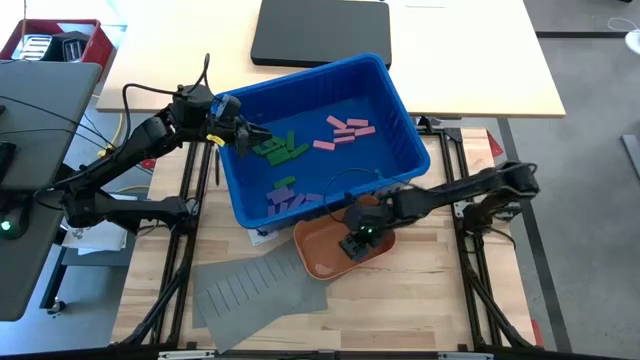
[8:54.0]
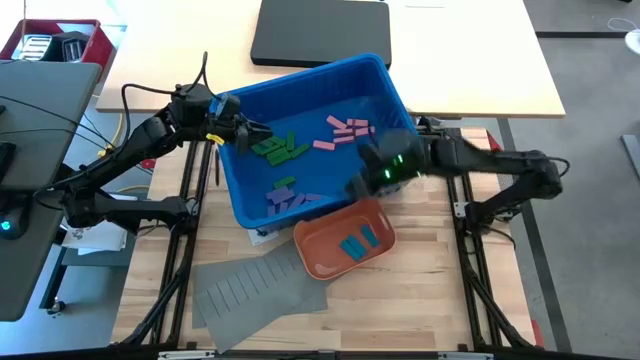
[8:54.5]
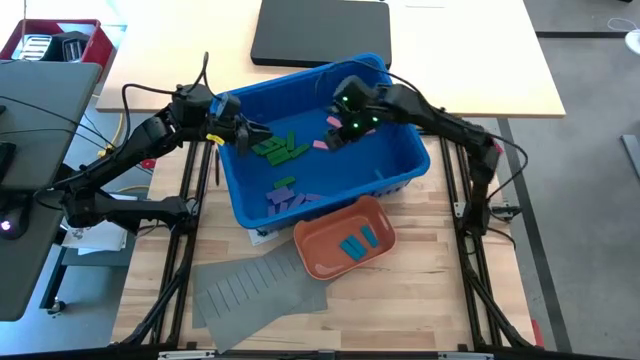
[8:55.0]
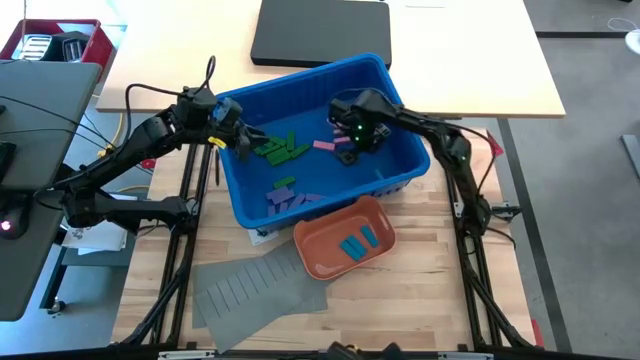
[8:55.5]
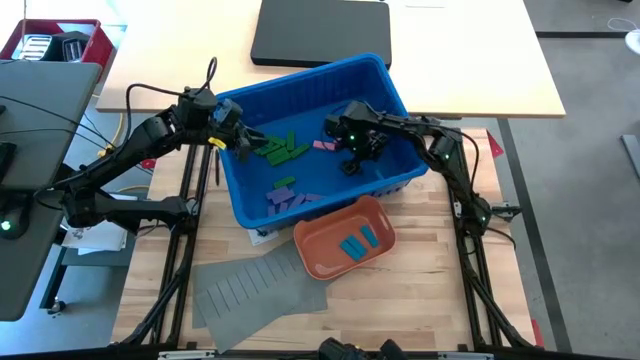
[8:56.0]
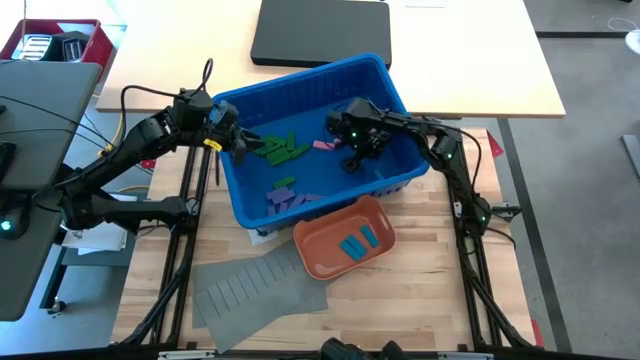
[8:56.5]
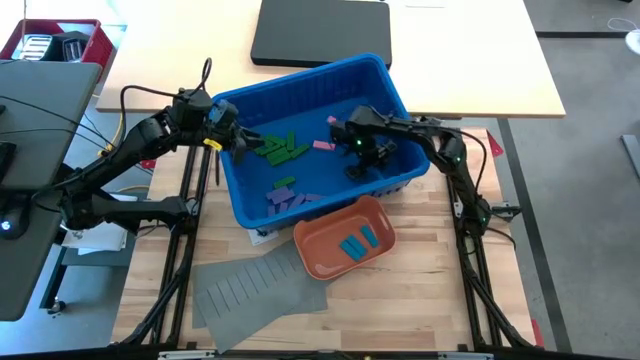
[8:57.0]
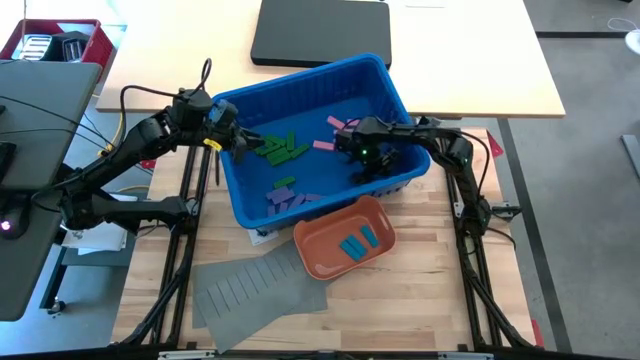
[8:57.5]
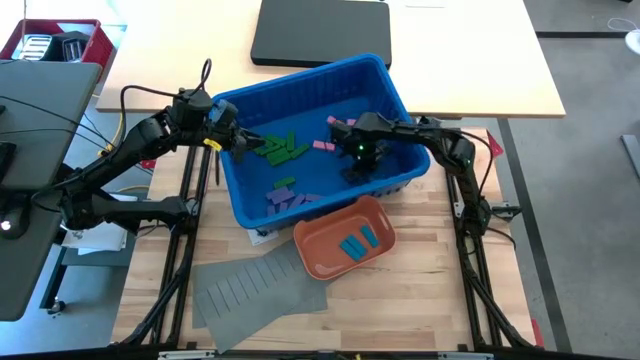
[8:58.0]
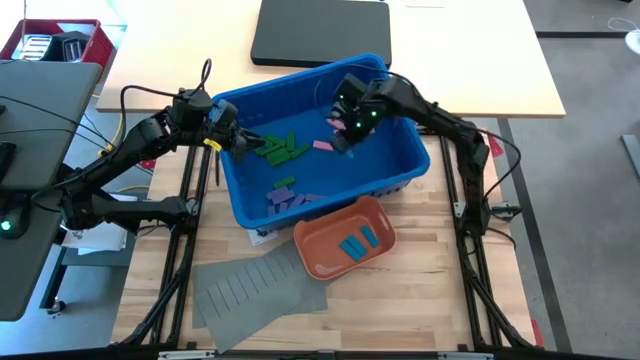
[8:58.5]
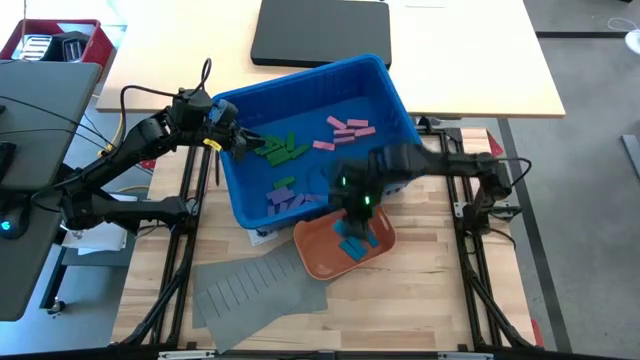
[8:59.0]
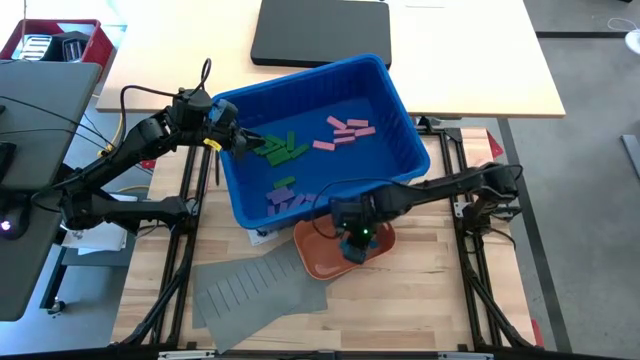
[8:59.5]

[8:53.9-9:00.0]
Task: Sort blocks
Put the blue block into the orange bin

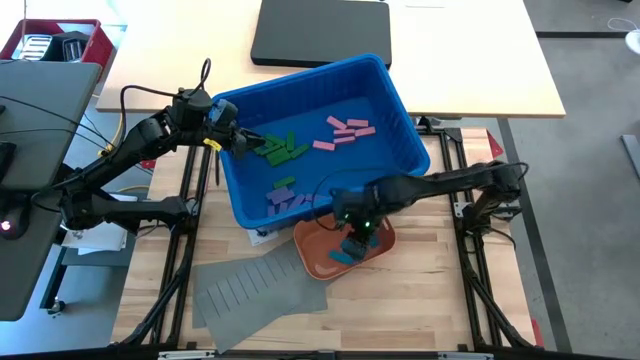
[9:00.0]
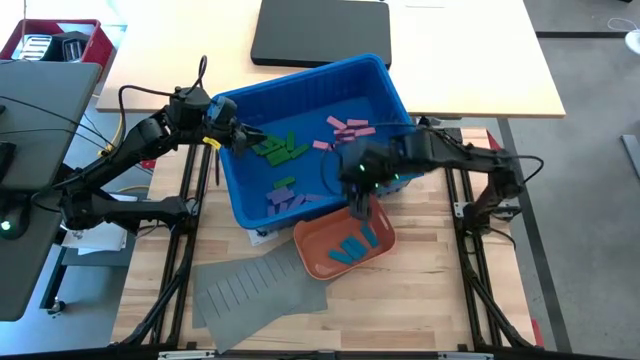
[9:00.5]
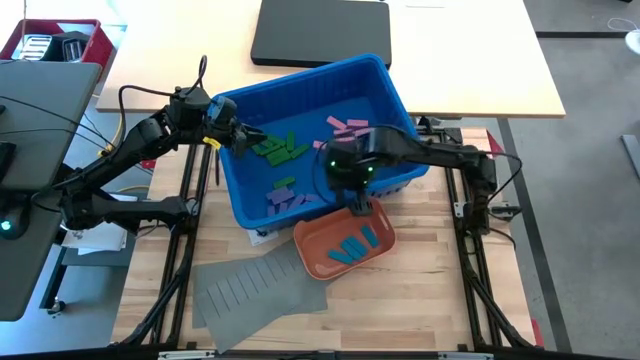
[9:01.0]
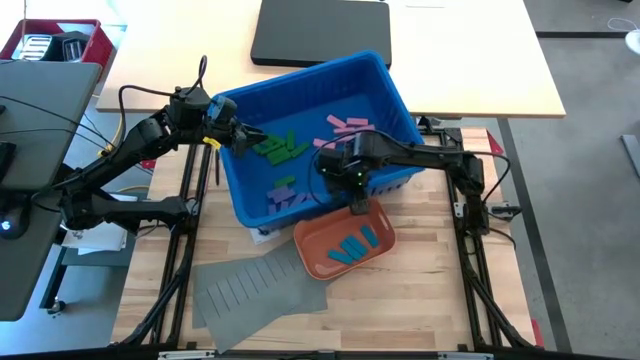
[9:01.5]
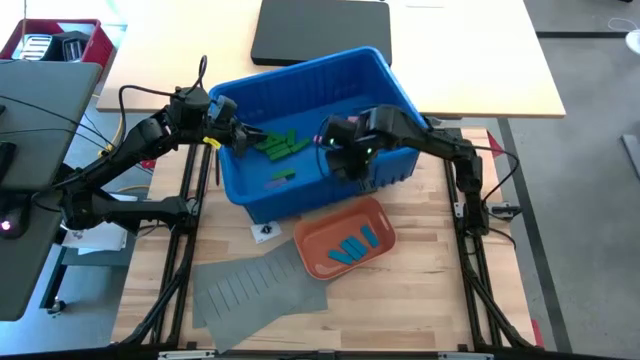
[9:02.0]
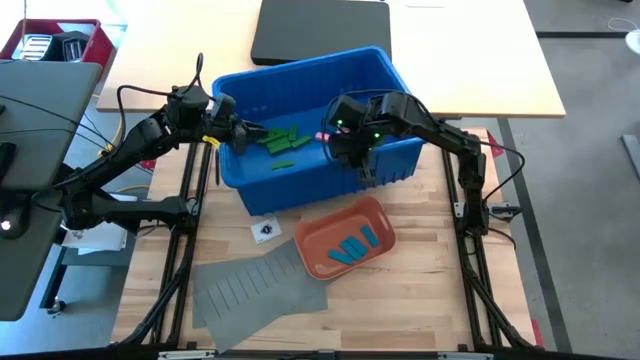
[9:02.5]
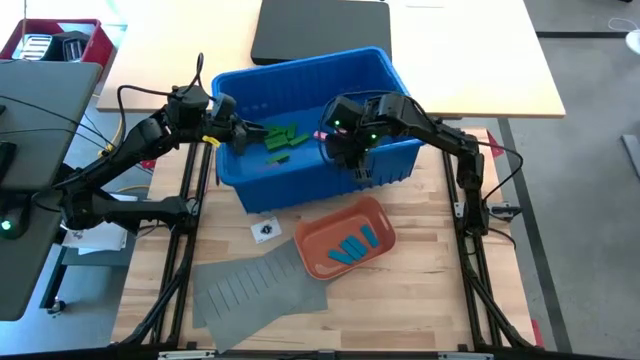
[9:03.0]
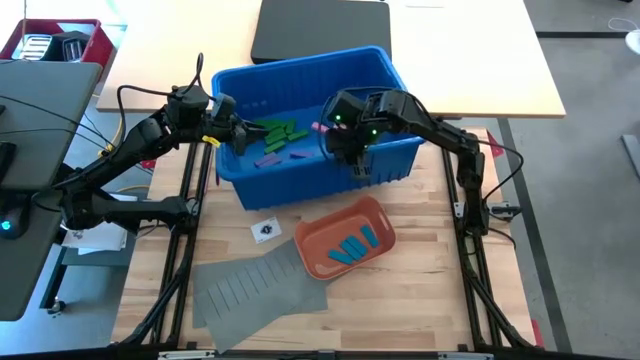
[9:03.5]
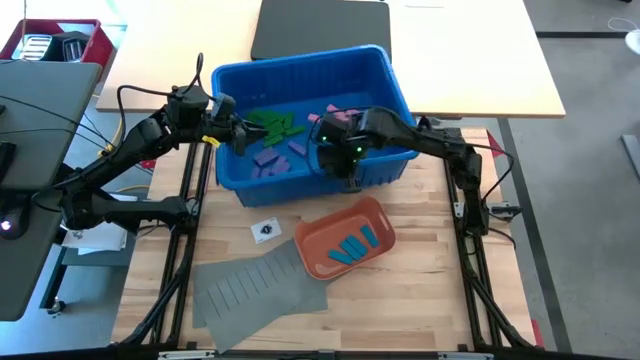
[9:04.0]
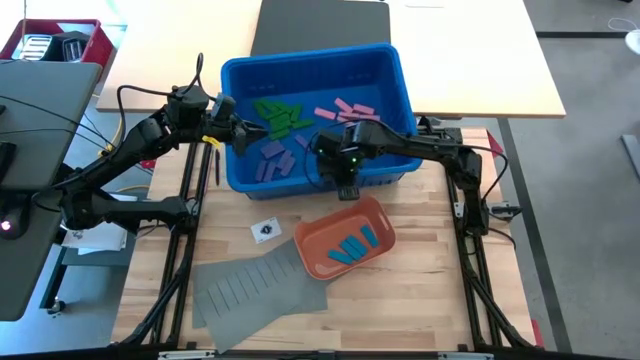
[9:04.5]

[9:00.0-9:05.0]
Adjust the blue bin

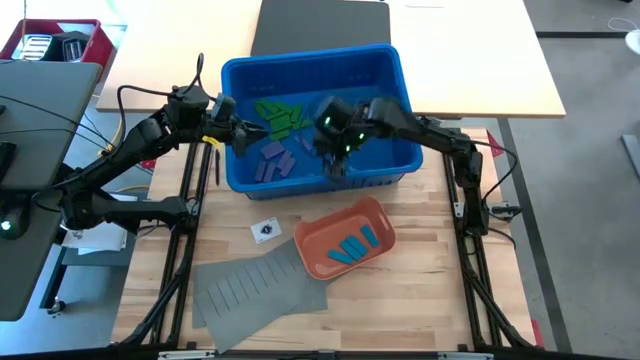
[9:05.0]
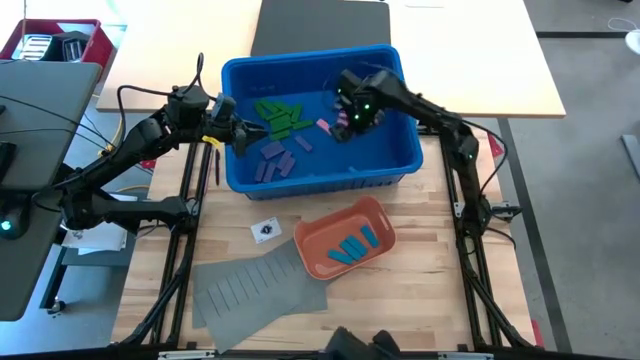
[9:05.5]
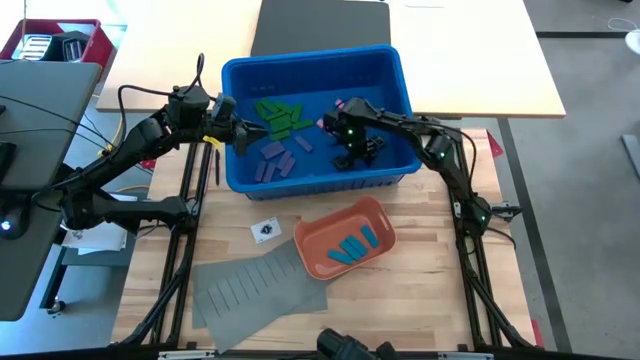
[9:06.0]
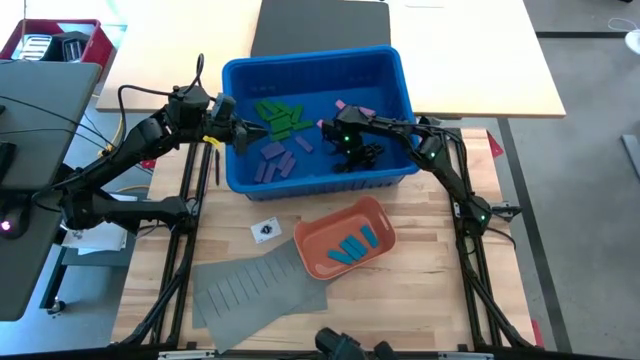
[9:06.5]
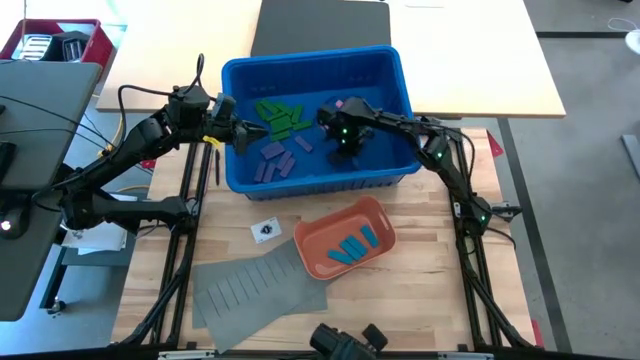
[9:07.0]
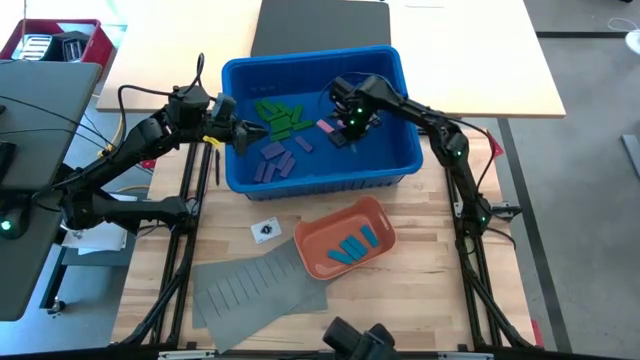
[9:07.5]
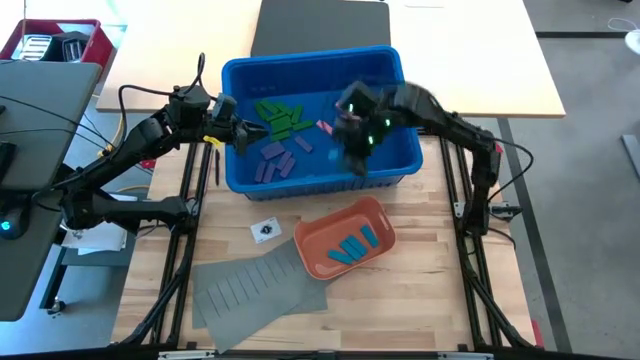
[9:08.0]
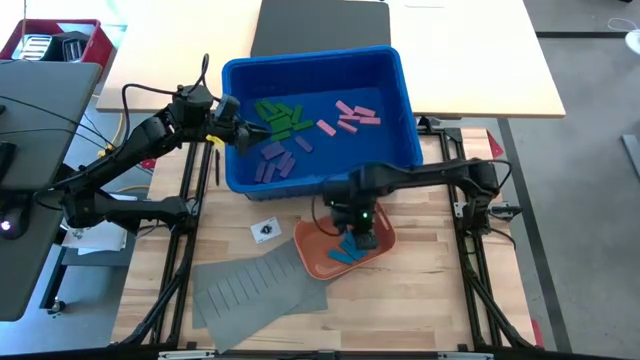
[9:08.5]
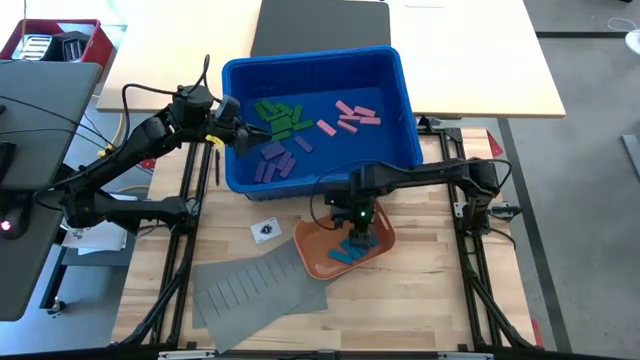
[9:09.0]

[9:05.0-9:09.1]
Put the blue block into the orange bin

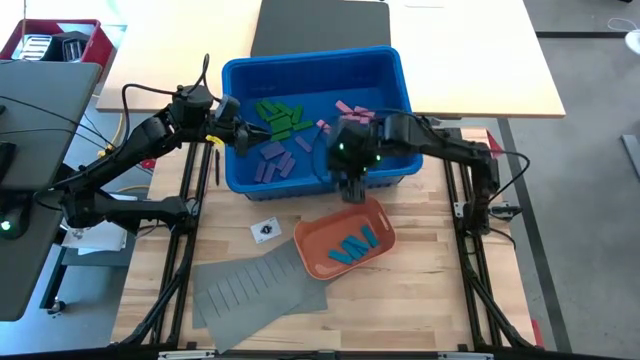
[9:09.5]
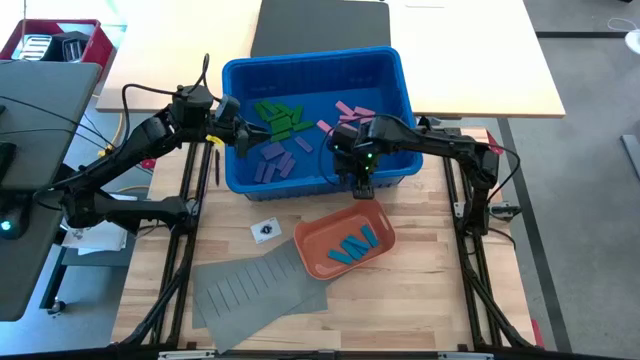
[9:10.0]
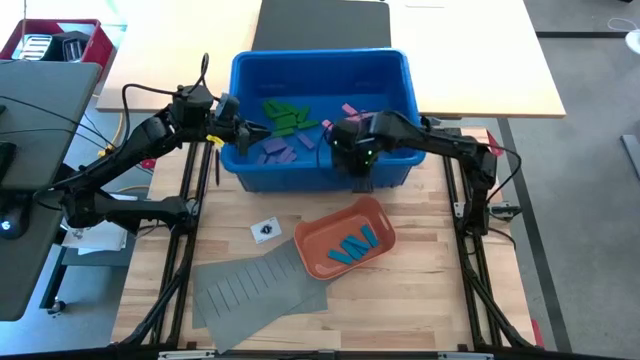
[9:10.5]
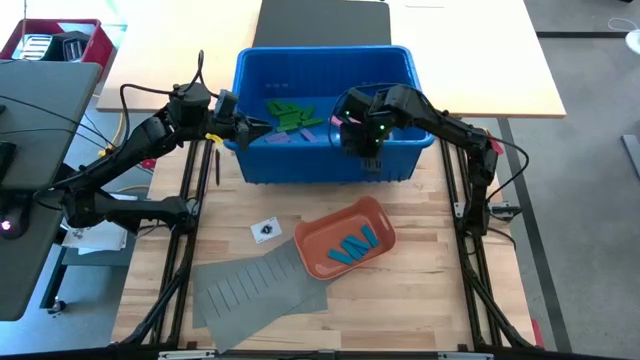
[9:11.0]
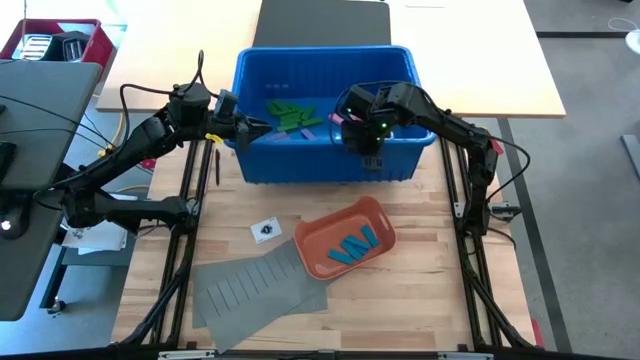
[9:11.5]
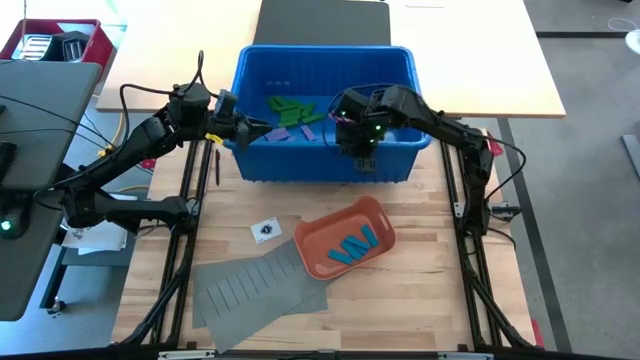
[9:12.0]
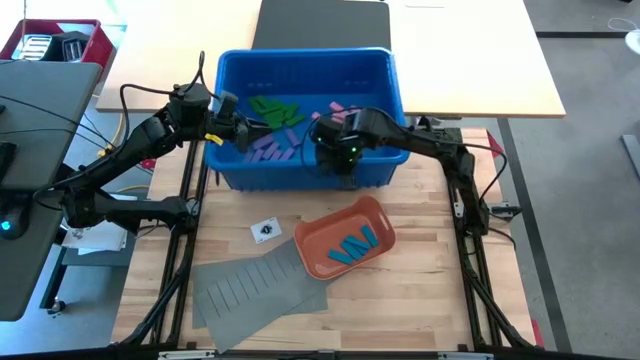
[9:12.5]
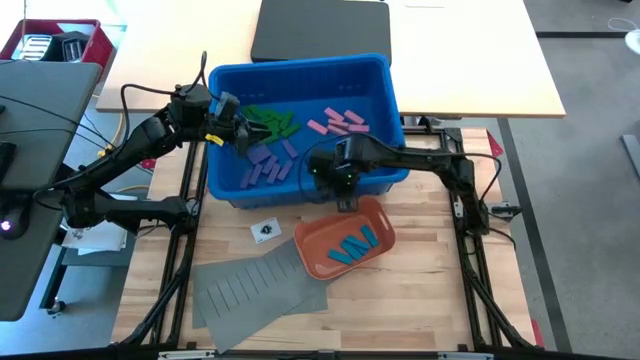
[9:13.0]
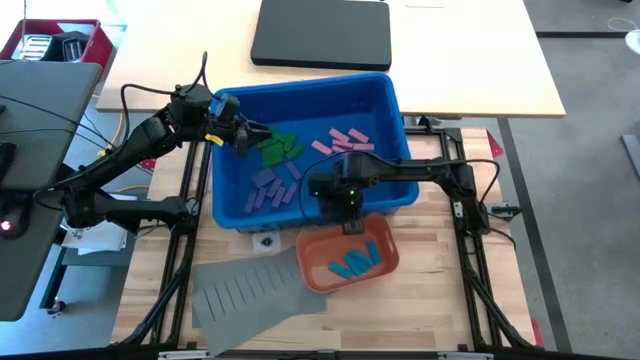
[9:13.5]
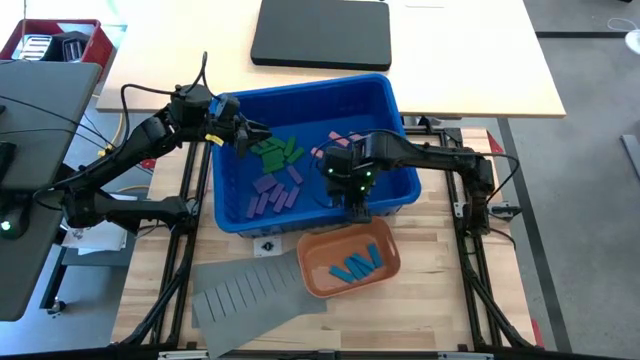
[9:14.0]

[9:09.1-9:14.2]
Adjust the blue bin
